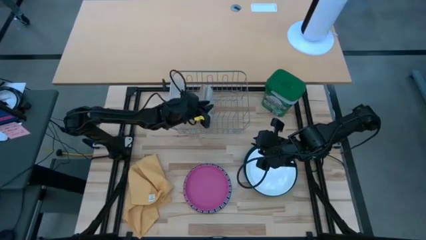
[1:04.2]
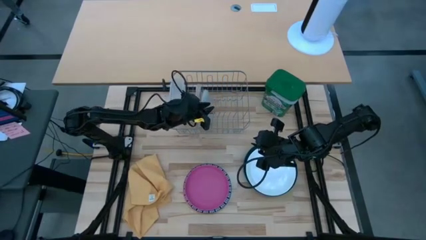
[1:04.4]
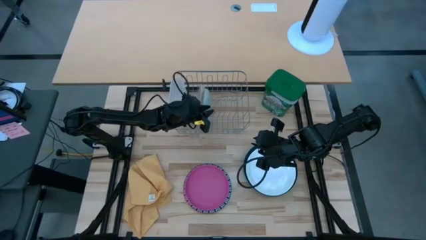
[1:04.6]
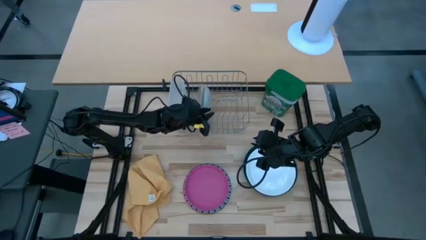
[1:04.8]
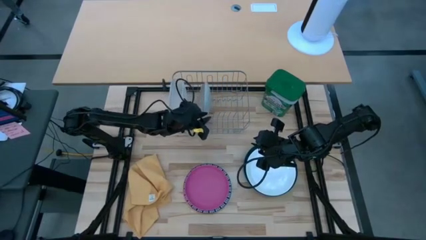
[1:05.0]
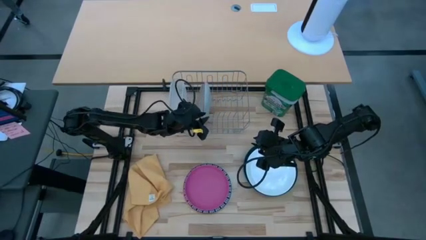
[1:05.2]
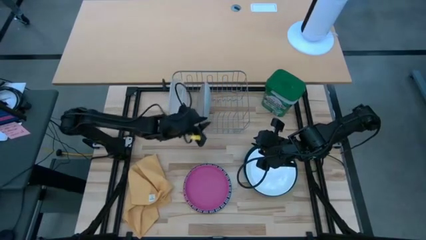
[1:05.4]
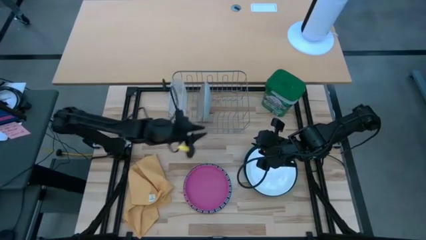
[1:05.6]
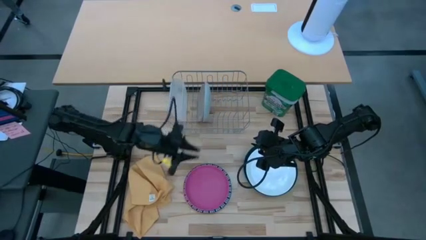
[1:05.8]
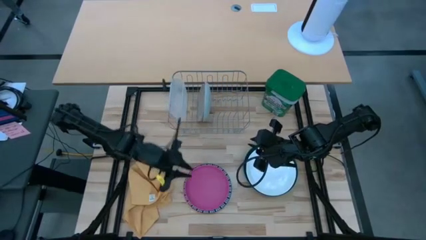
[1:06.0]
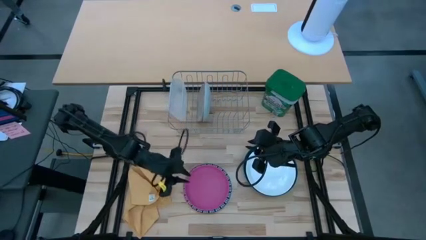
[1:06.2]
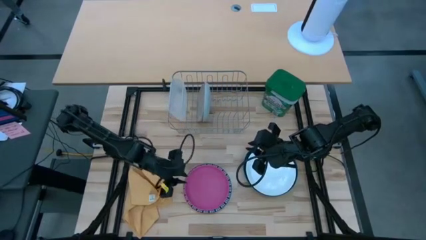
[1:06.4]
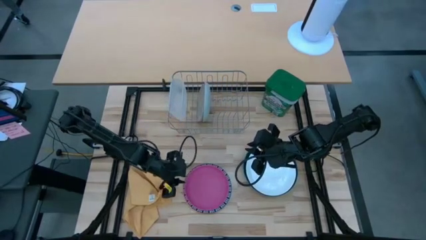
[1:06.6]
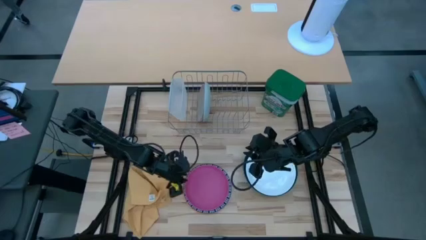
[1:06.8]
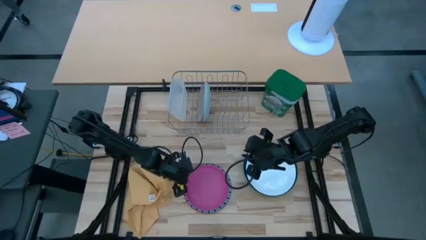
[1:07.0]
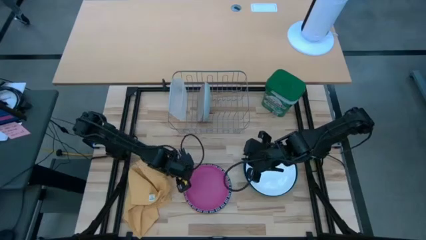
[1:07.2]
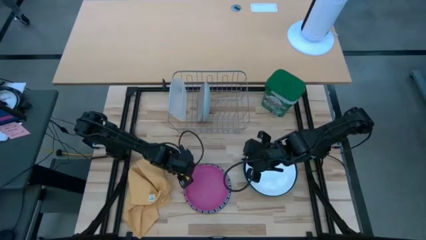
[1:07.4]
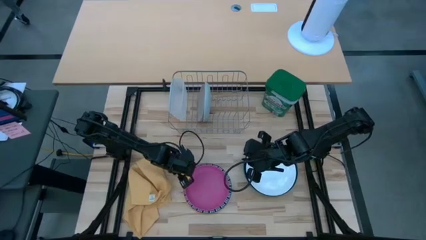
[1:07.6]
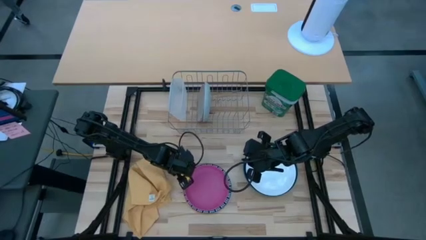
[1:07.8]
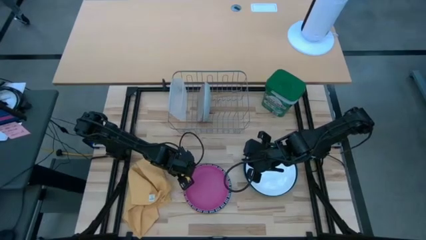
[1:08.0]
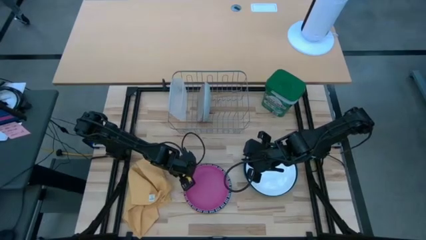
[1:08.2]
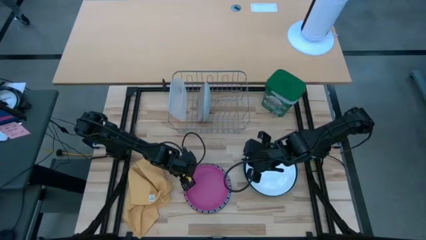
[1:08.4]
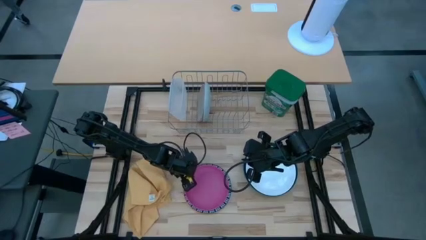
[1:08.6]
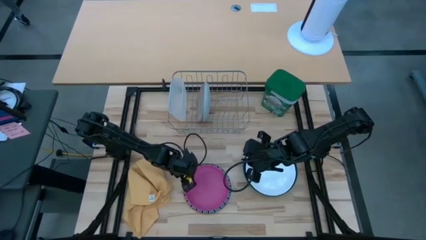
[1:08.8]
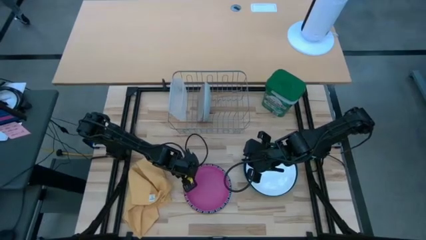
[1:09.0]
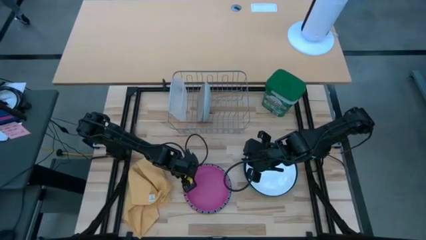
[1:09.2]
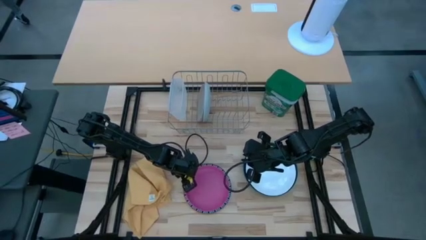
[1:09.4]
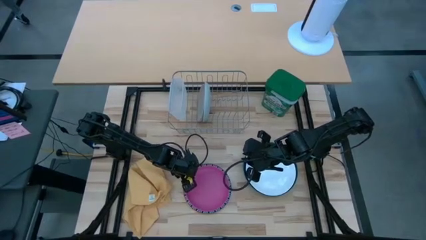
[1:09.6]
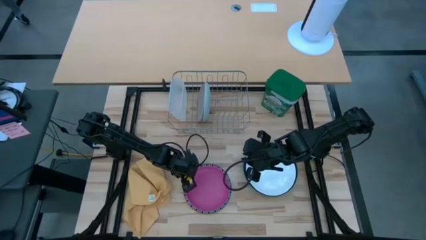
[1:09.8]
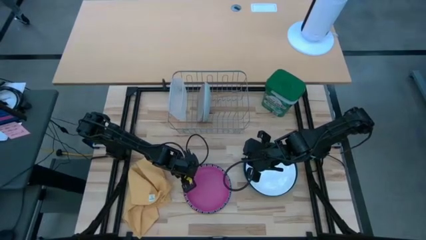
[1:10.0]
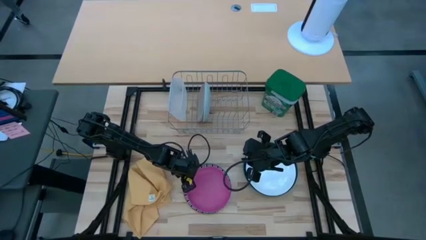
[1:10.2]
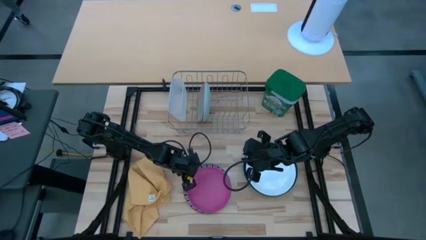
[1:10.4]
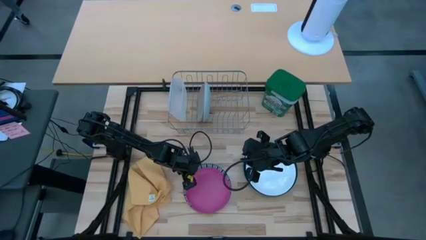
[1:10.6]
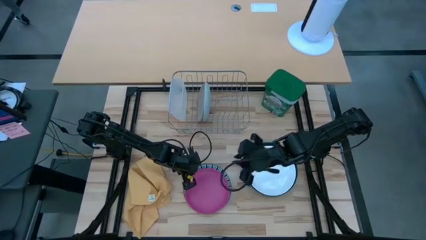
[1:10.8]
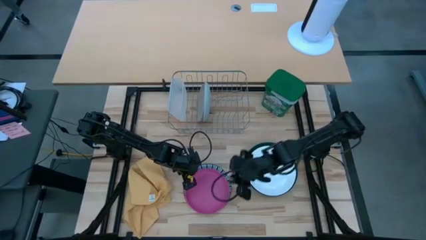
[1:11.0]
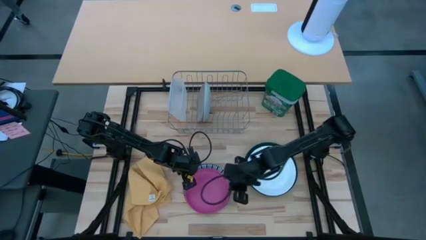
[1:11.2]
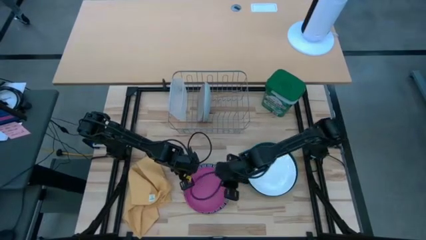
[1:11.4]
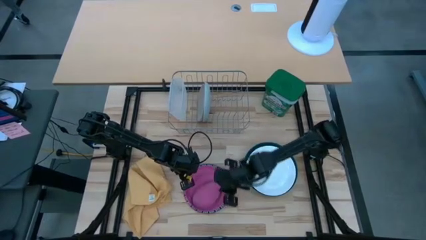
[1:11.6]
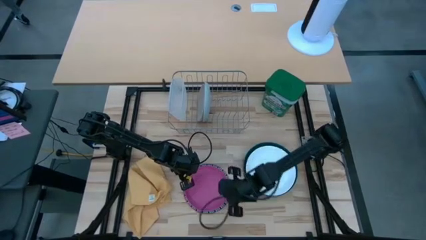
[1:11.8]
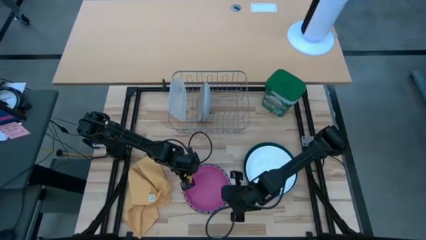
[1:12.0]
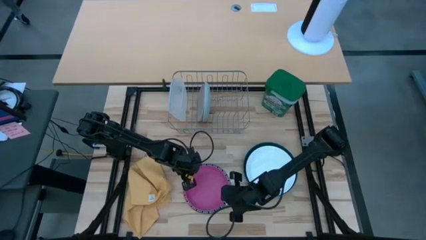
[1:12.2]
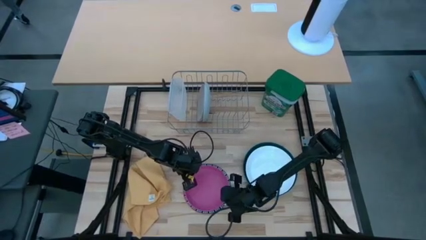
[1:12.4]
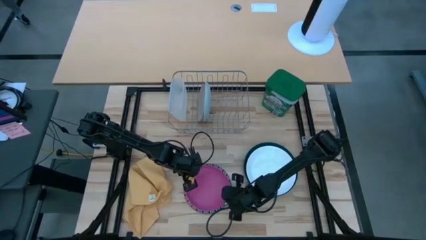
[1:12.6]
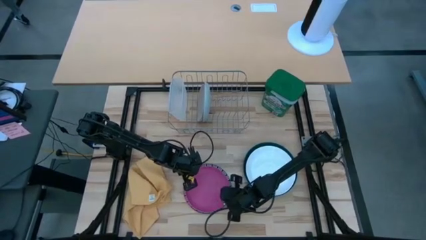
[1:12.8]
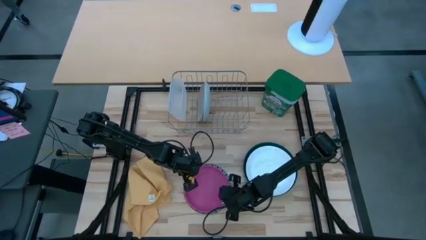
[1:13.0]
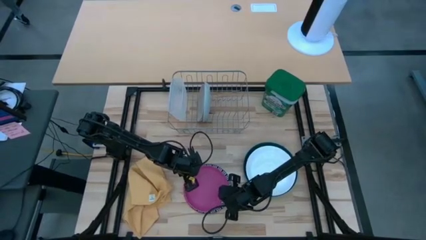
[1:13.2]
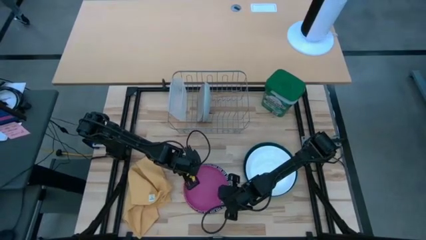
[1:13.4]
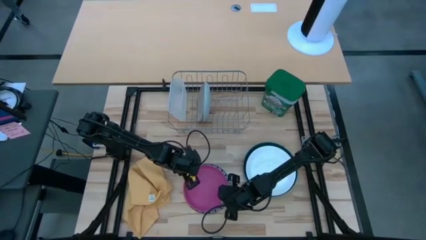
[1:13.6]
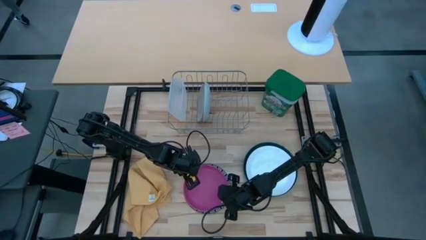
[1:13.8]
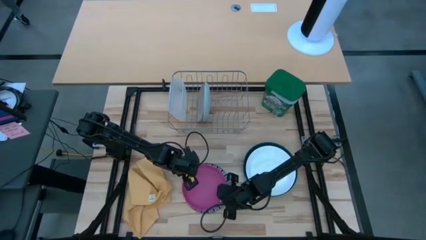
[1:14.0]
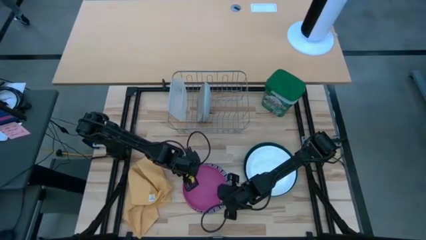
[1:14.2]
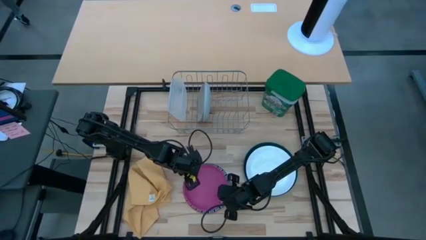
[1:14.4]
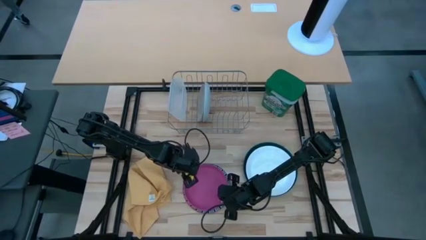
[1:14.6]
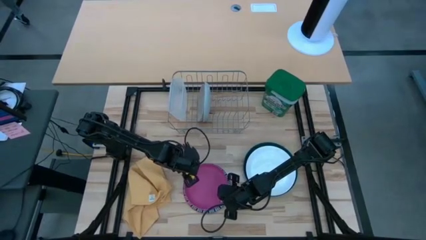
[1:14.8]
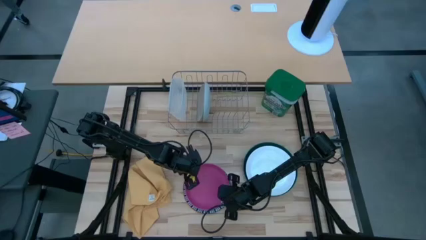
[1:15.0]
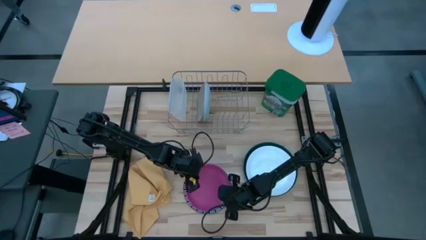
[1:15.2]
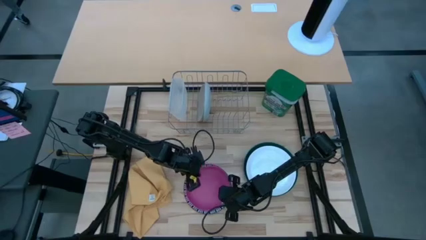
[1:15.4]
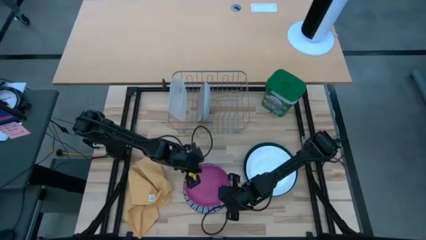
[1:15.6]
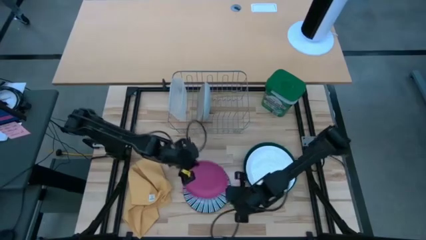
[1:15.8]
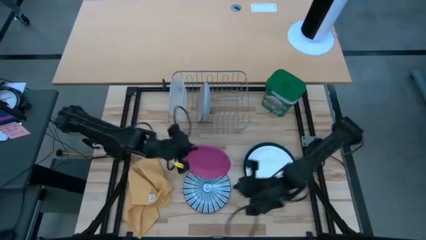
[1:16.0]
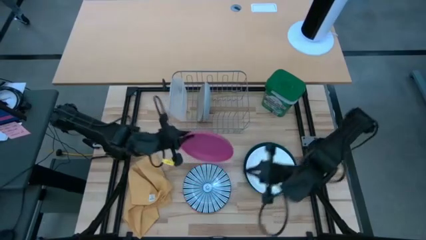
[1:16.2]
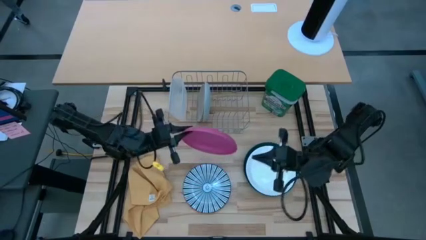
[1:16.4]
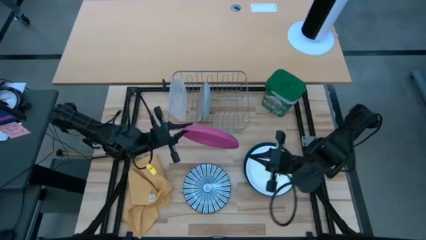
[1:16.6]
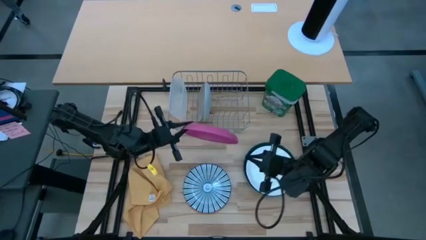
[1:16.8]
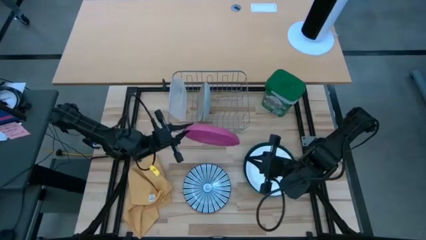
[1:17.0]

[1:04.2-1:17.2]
Task: Sort dishes
Put the pink plate into the dish rack

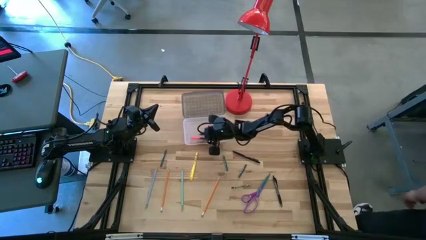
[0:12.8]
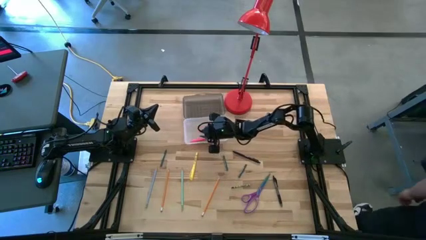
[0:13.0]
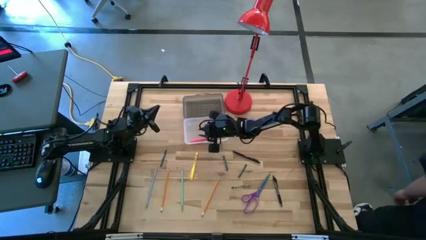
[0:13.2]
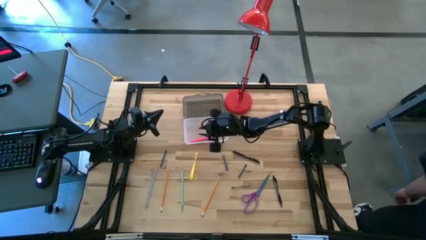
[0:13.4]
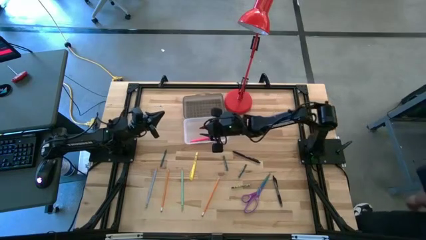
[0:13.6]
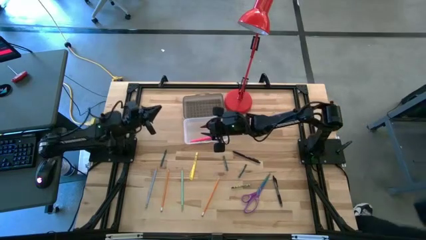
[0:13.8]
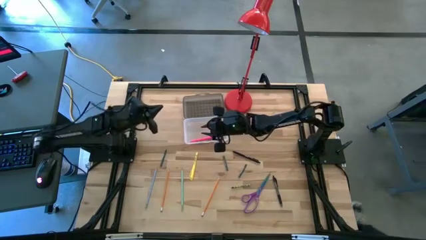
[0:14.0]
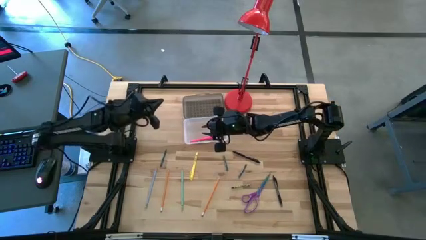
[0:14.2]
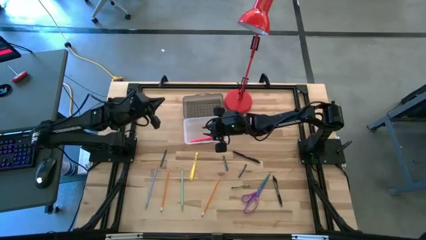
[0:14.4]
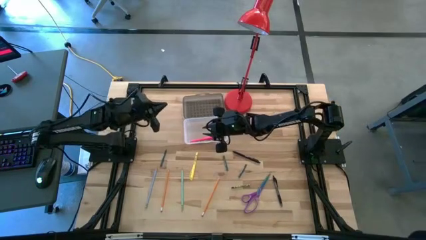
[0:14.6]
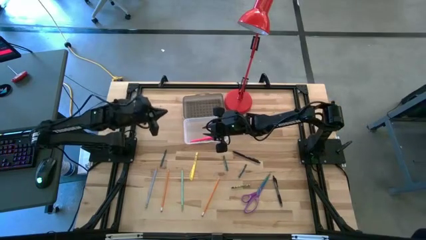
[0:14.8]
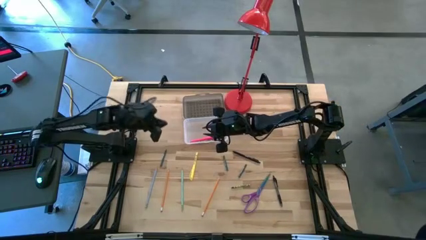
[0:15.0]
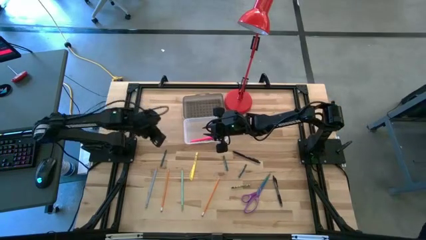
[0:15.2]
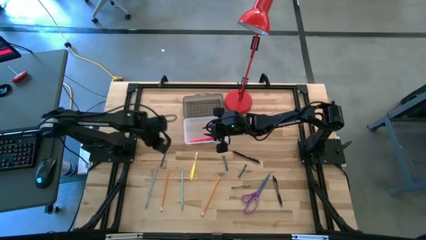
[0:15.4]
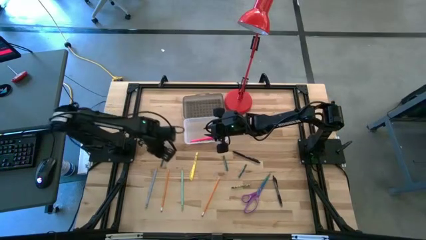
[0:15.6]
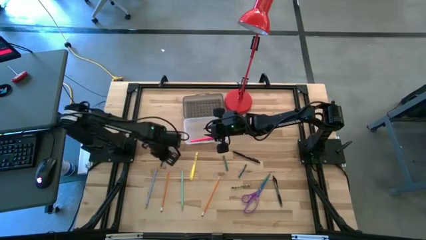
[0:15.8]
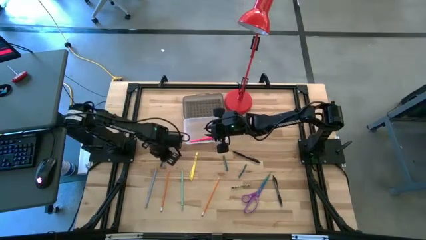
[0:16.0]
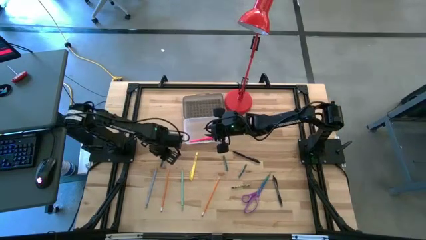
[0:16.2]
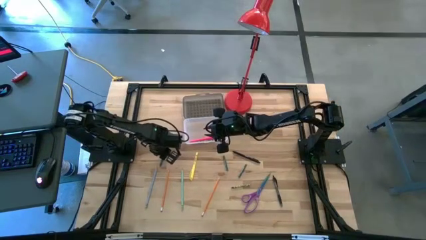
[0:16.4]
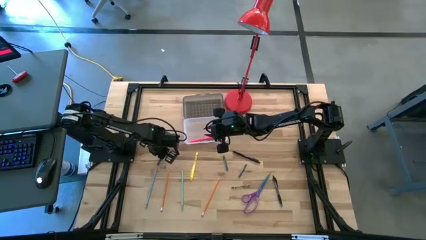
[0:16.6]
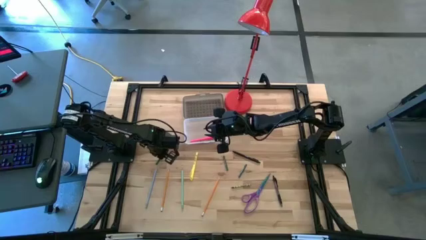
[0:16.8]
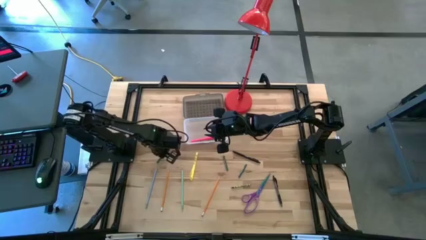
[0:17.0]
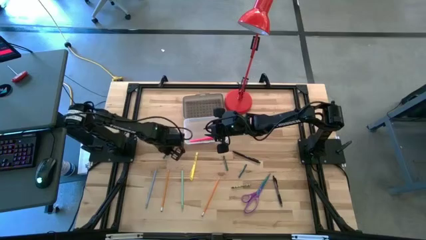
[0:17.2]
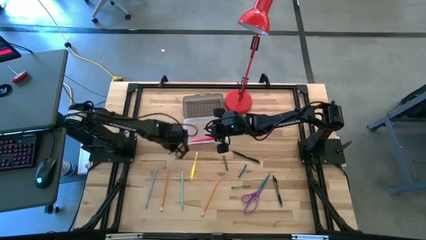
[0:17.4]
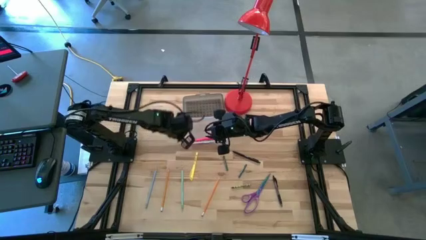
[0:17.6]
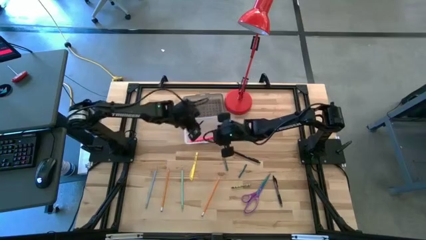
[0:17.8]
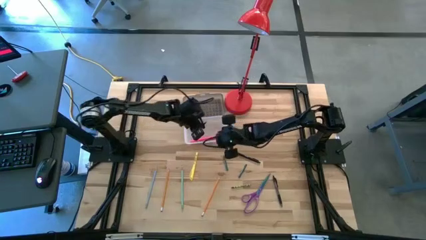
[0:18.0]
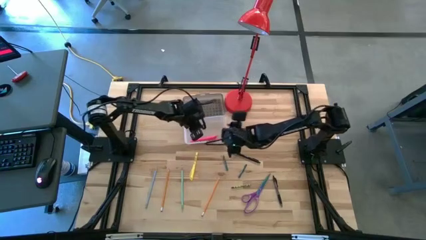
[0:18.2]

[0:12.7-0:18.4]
Task: Pick & place school supplies into a supply box
Put the left dark green crayon into the black supply box
